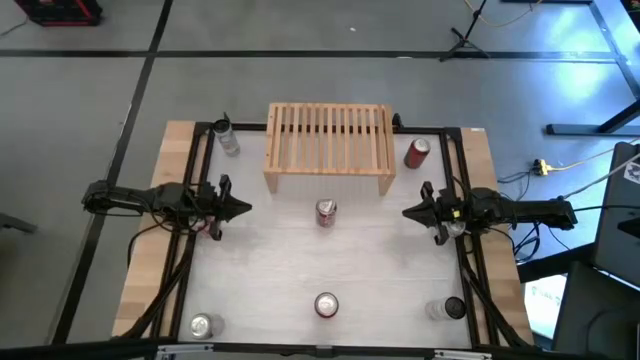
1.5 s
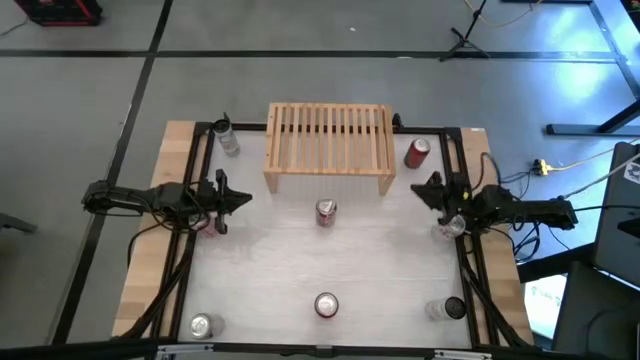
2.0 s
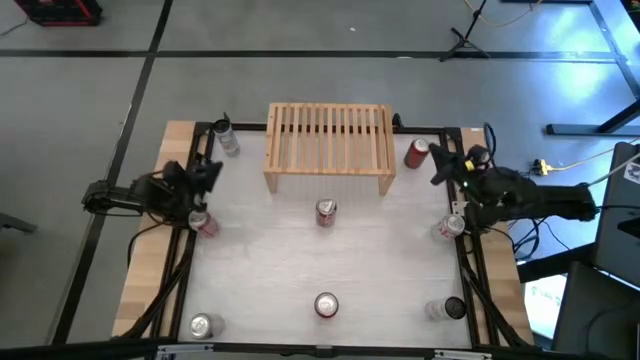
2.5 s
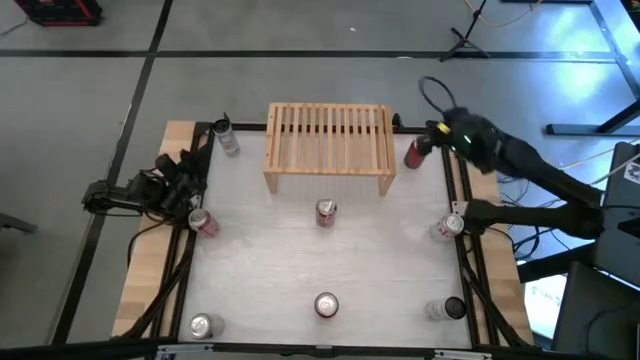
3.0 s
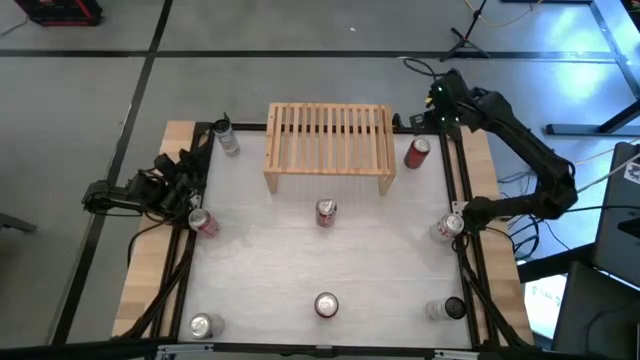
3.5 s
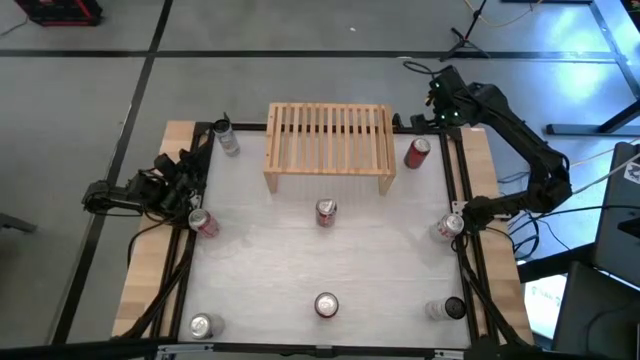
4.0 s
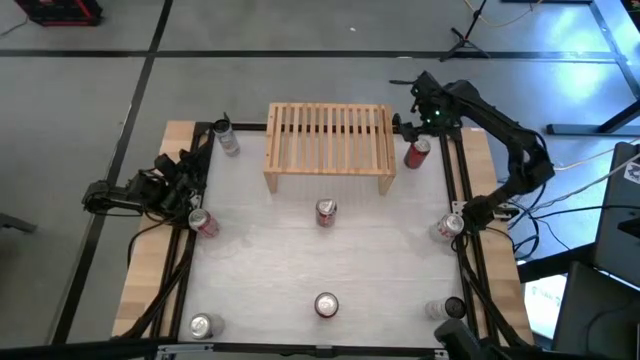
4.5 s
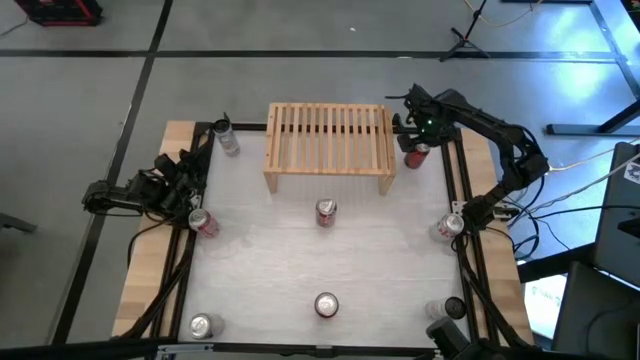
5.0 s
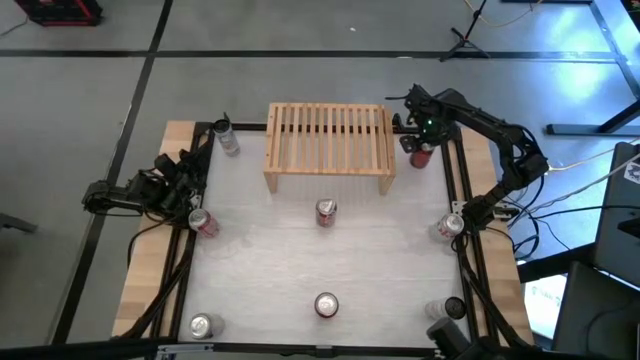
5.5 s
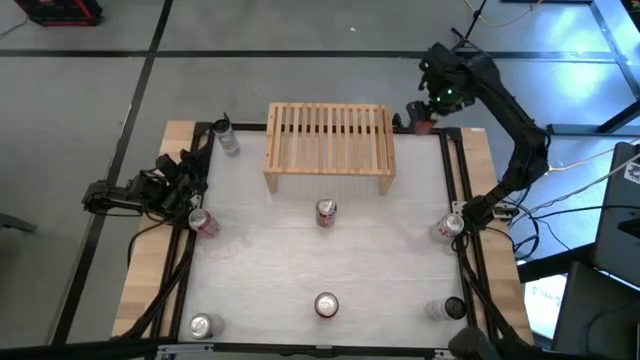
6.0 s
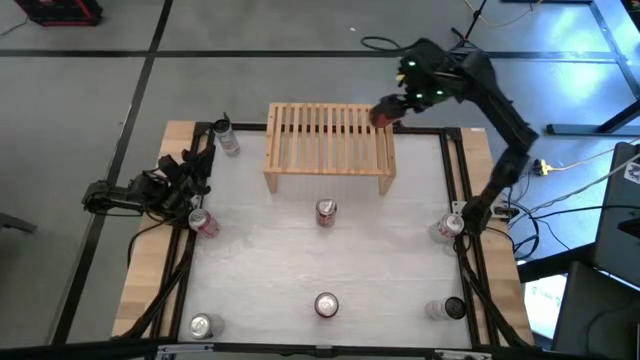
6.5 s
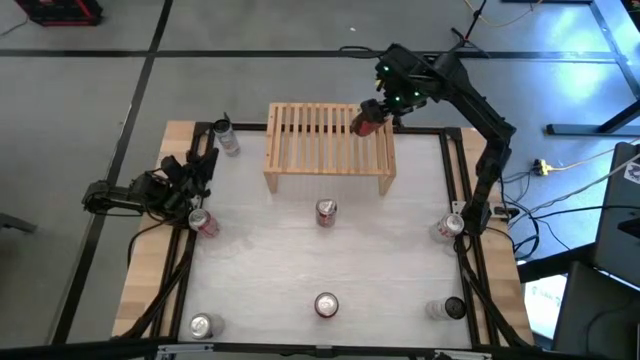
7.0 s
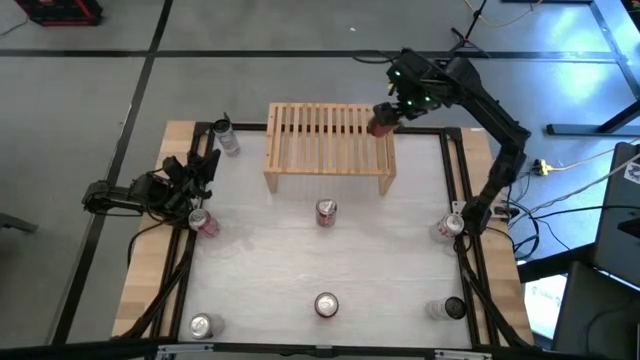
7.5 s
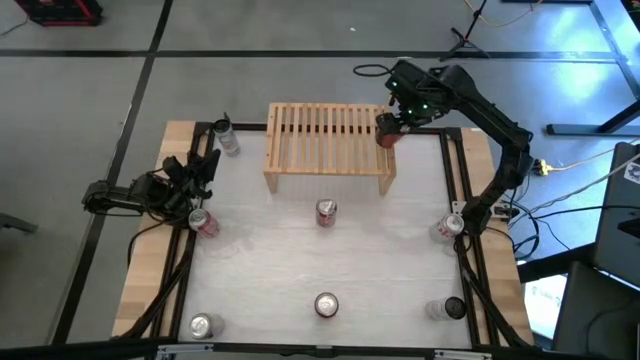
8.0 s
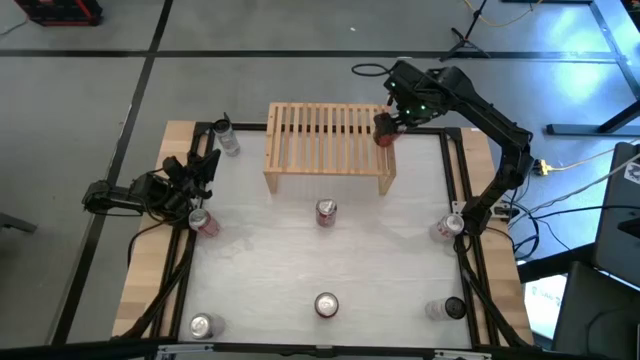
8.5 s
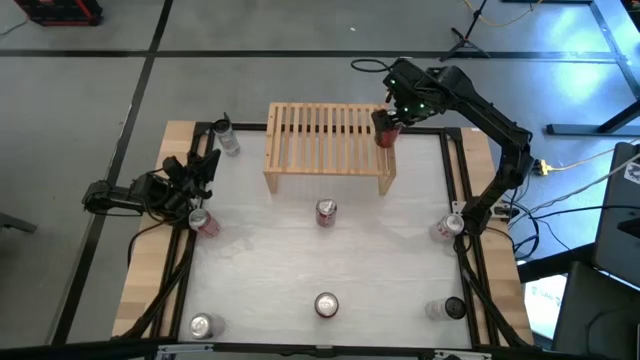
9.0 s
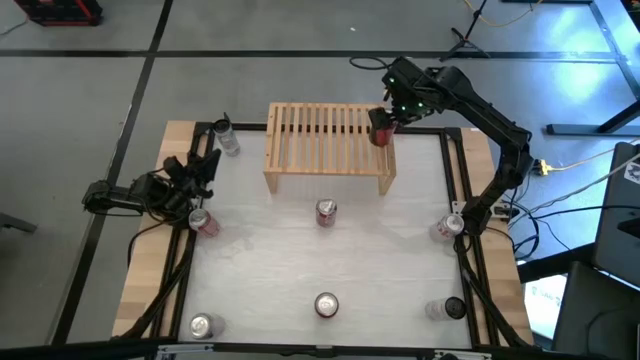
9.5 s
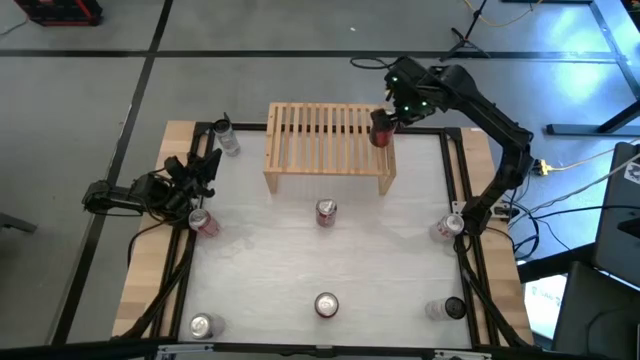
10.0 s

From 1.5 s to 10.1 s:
Task: Place canned beverage on shelf
Put the top red black soda can on the shelf

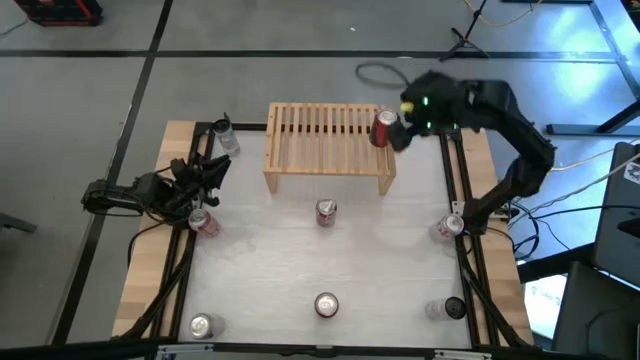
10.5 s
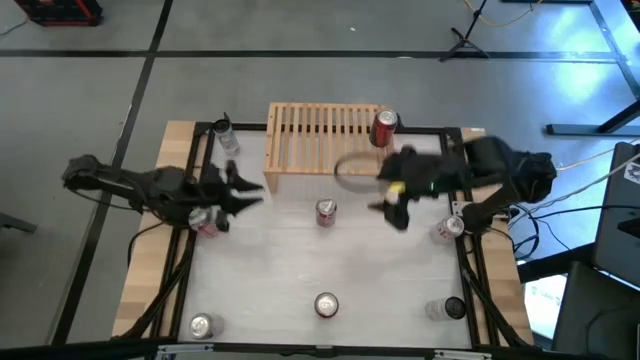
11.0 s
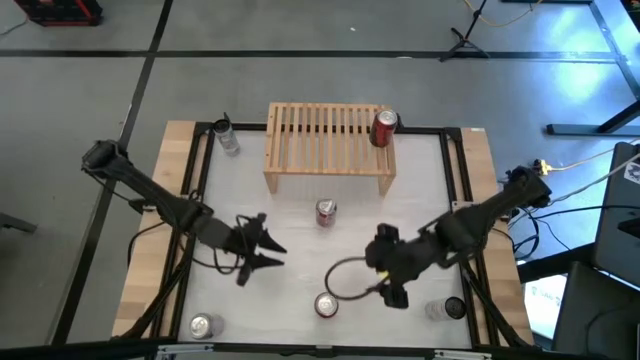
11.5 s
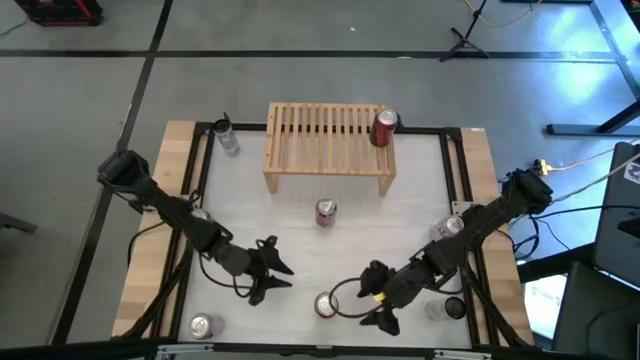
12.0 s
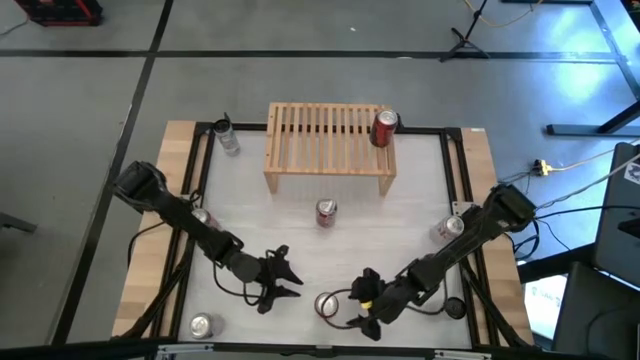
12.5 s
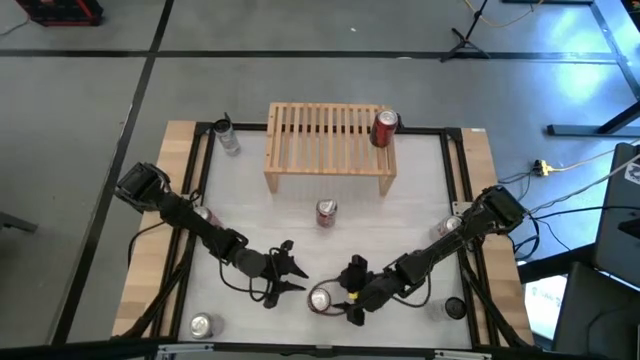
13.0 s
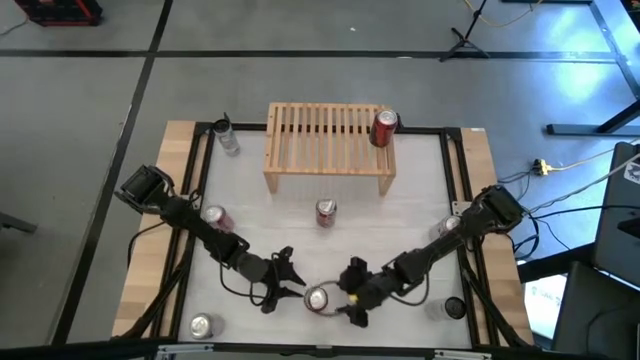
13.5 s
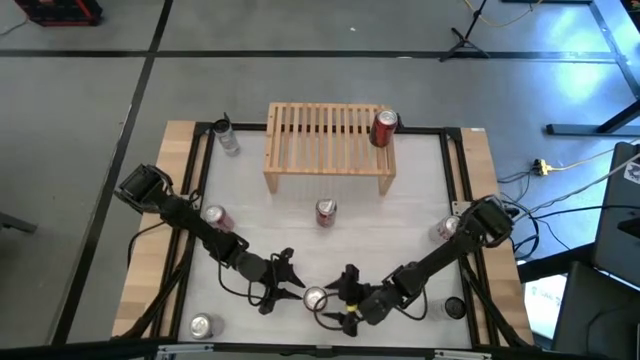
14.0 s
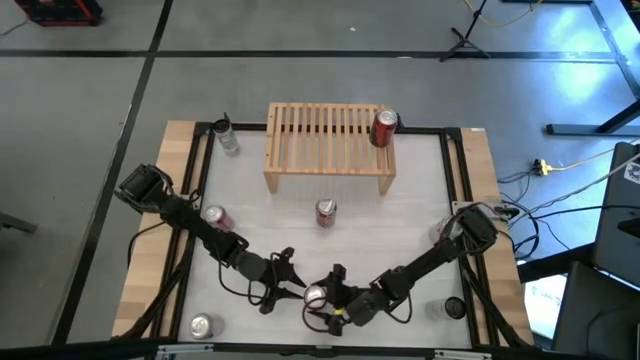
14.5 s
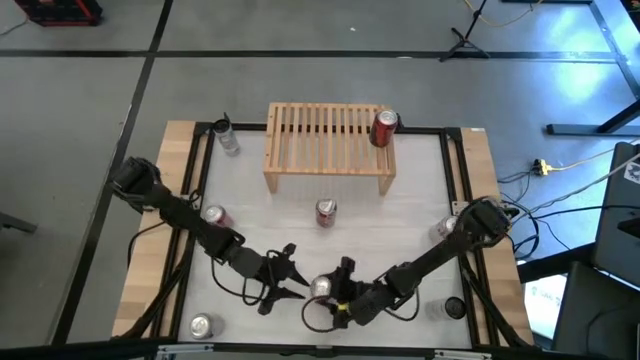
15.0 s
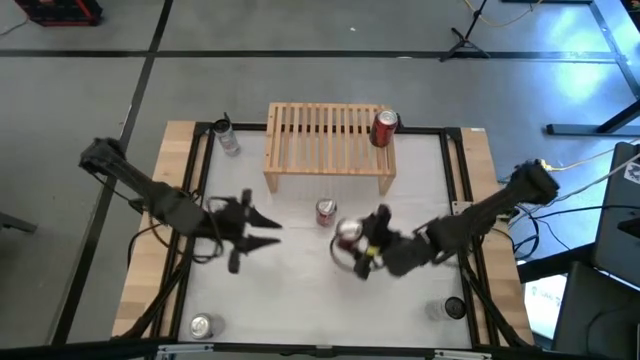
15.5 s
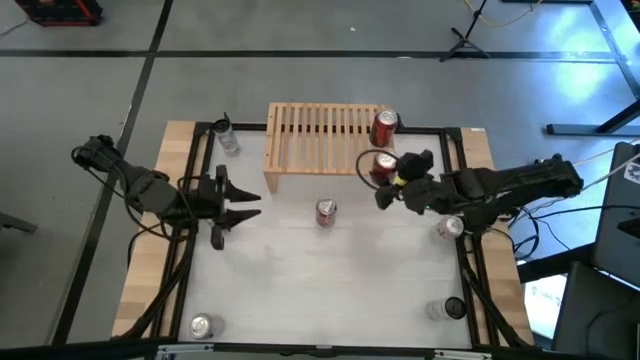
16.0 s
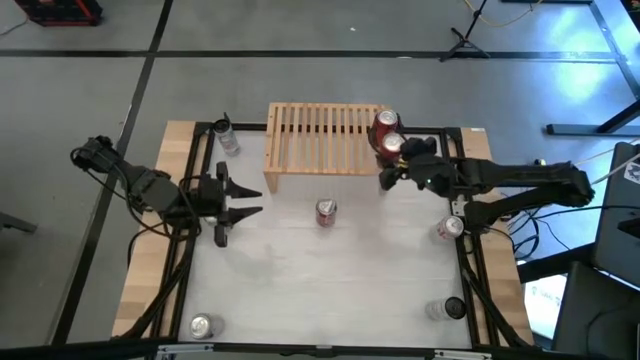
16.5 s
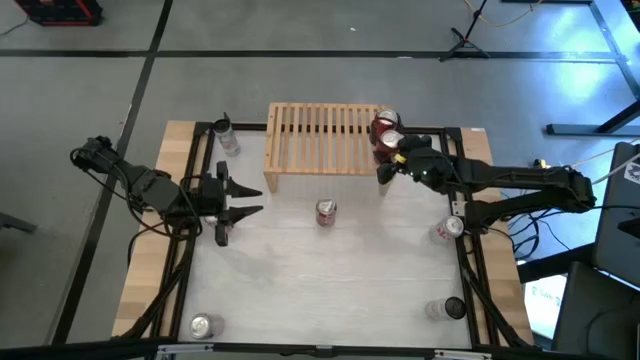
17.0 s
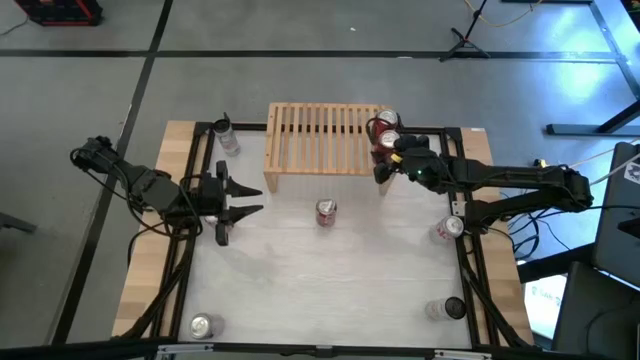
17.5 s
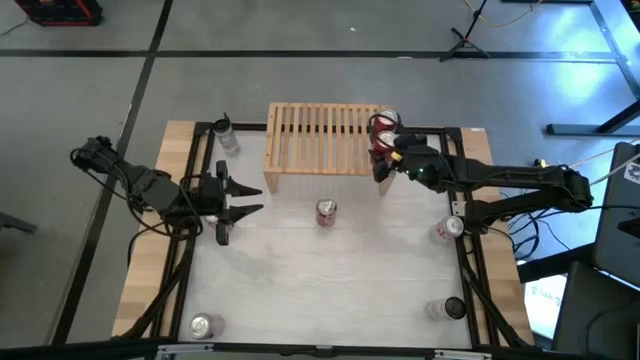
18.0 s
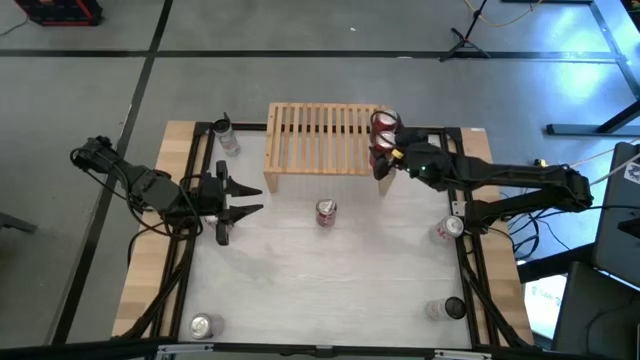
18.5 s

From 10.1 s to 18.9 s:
Put the red black soda can aligned with the other red black soda can on the shelf

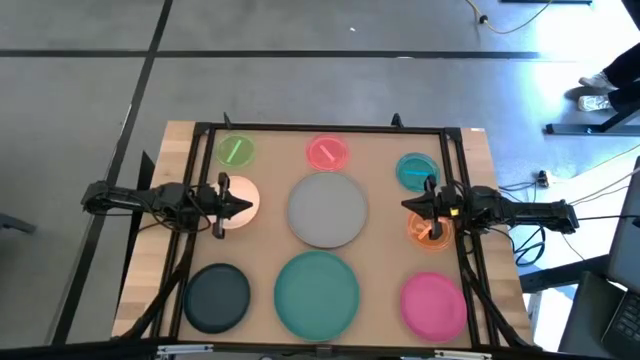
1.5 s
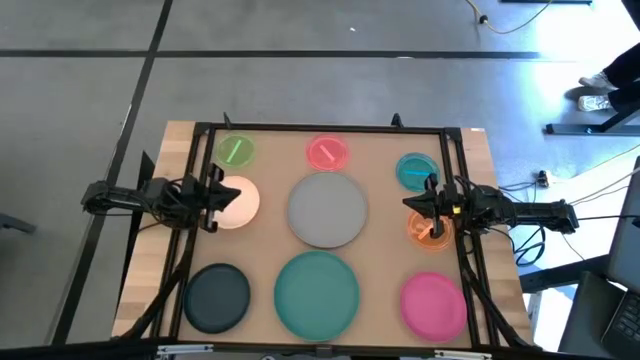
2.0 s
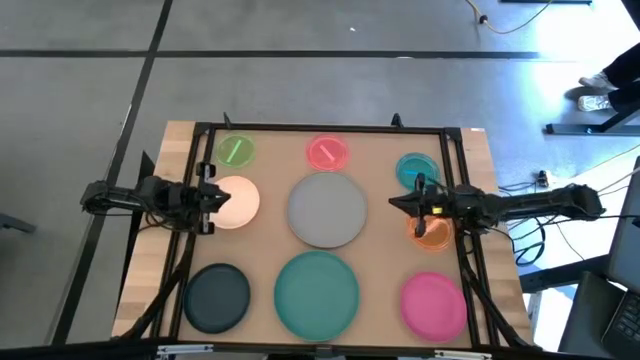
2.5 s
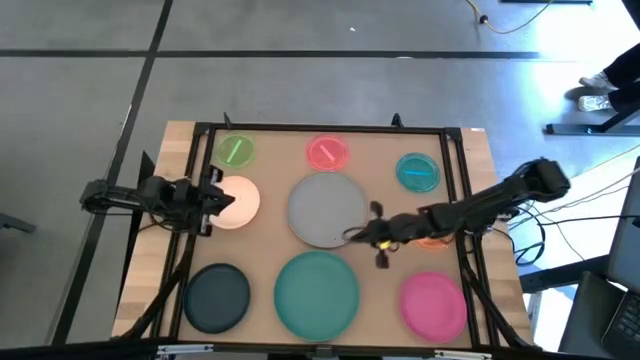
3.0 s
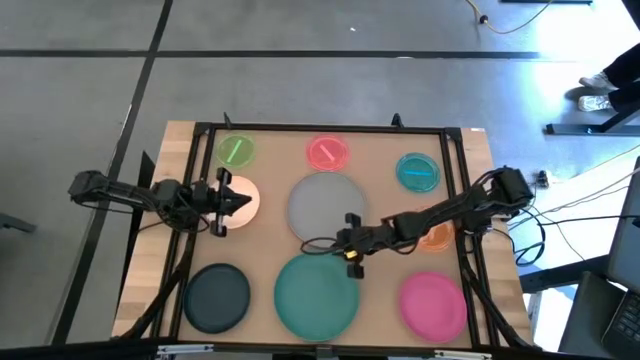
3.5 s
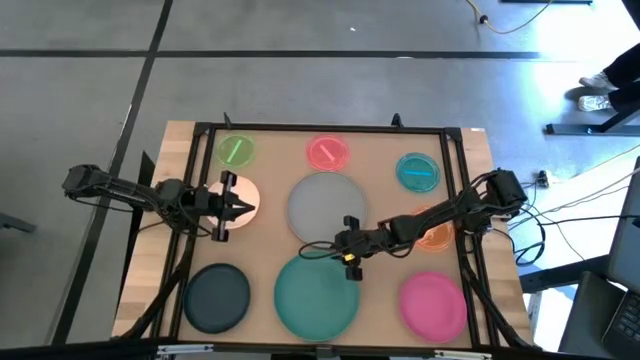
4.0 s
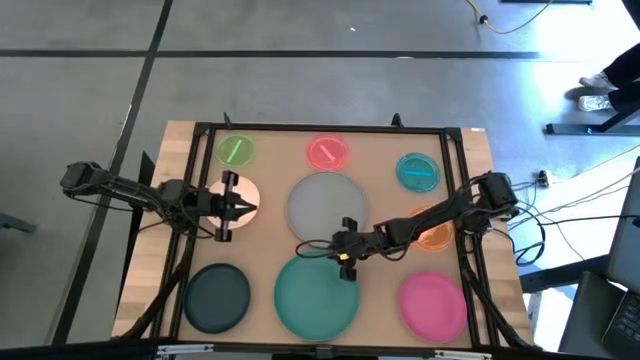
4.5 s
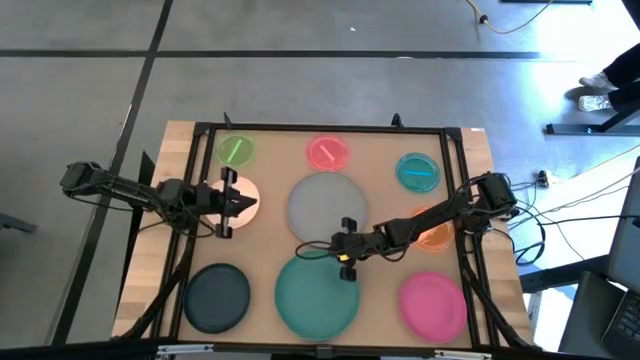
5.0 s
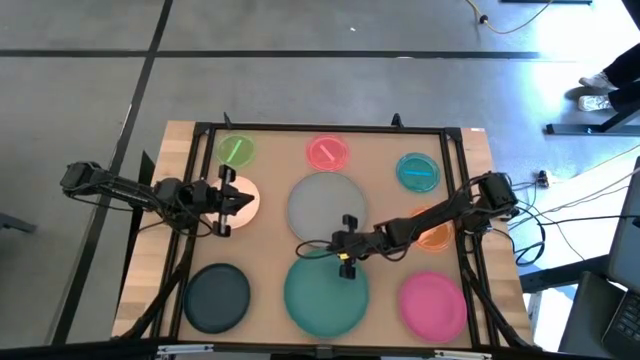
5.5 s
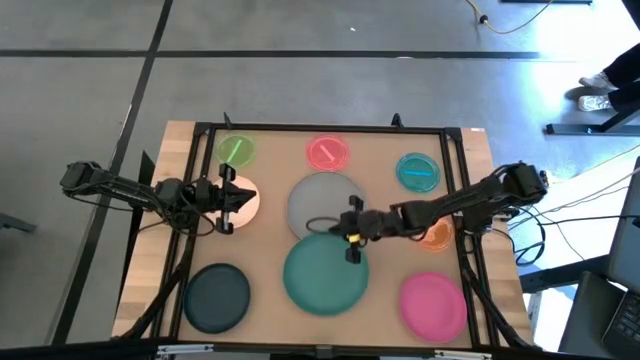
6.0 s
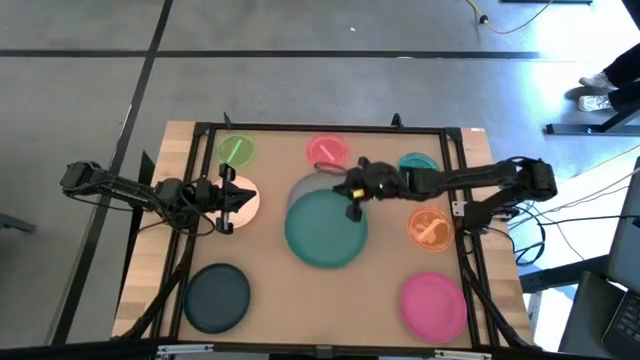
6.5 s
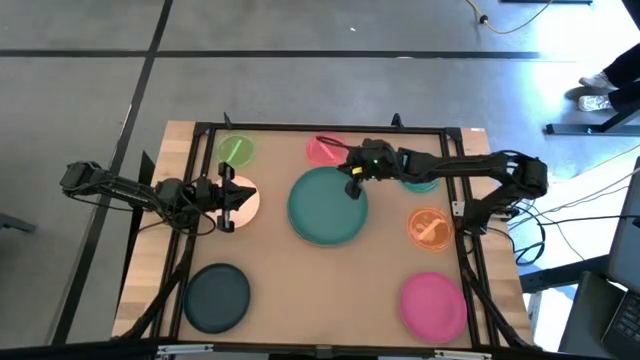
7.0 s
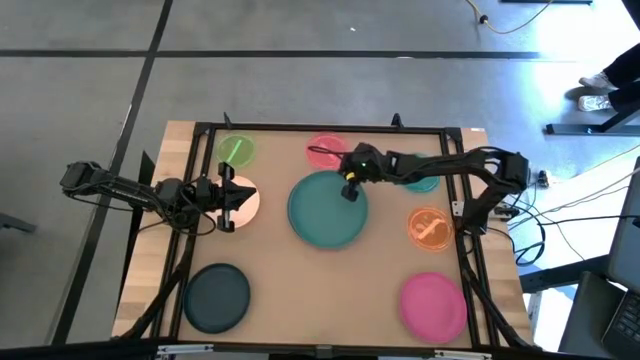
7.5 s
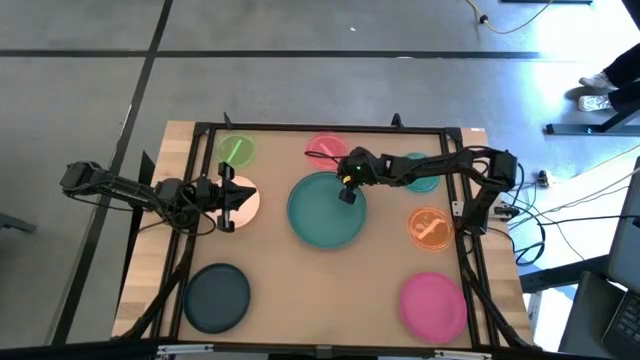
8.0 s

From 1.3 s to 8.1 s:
Task: Stack plastic plates
Stack the green plate on top of the gray plate
